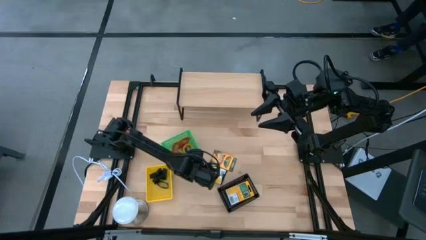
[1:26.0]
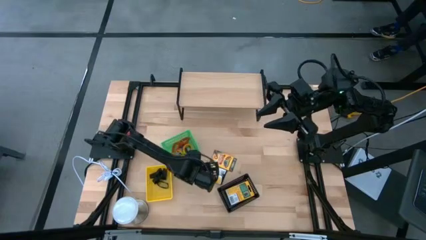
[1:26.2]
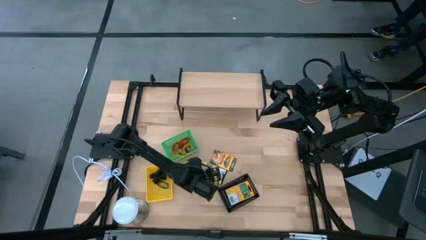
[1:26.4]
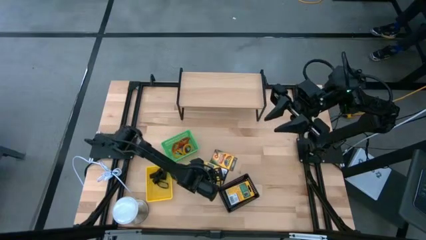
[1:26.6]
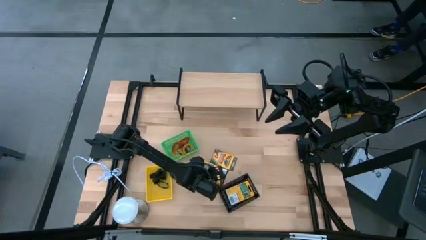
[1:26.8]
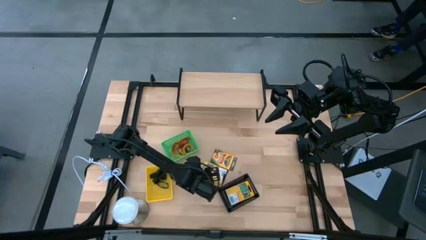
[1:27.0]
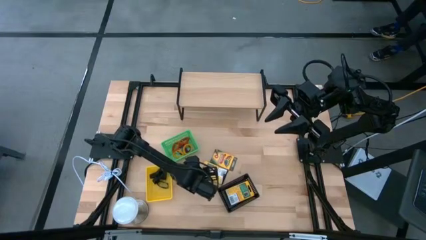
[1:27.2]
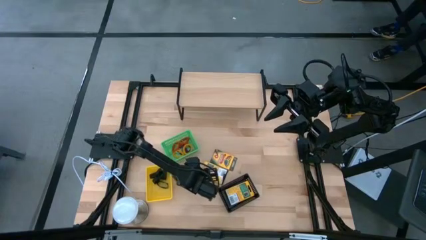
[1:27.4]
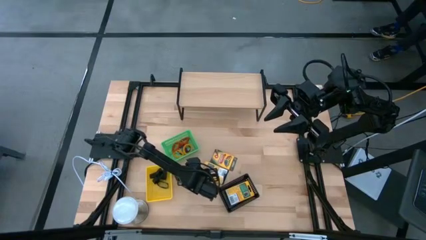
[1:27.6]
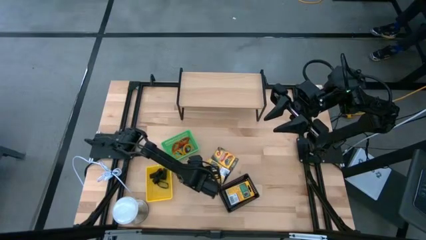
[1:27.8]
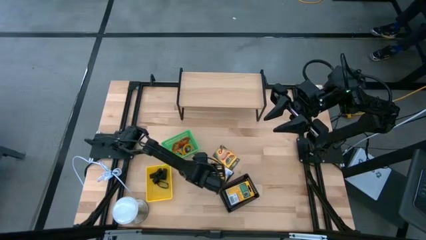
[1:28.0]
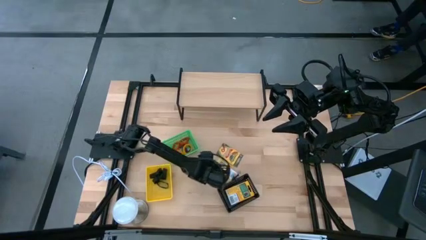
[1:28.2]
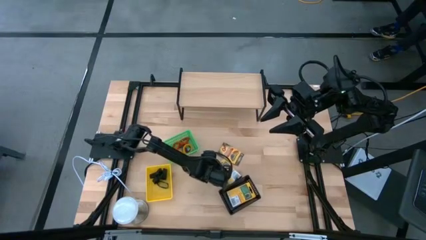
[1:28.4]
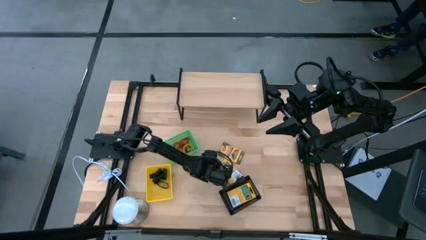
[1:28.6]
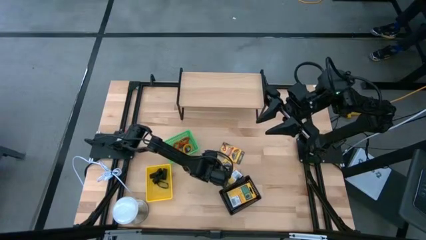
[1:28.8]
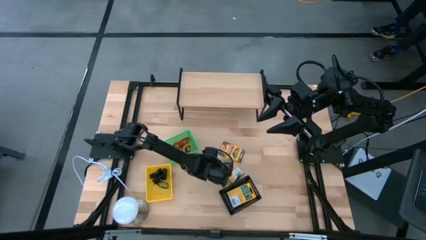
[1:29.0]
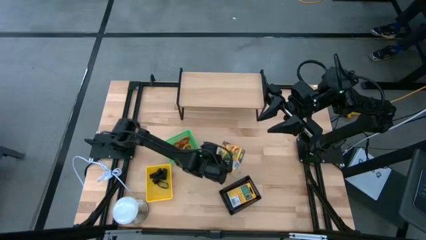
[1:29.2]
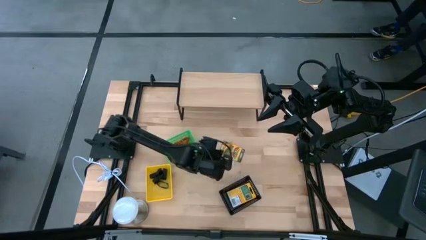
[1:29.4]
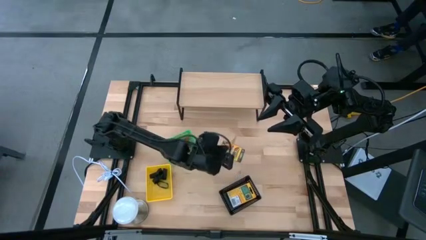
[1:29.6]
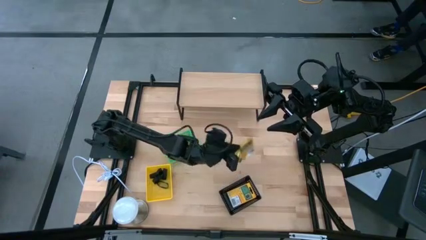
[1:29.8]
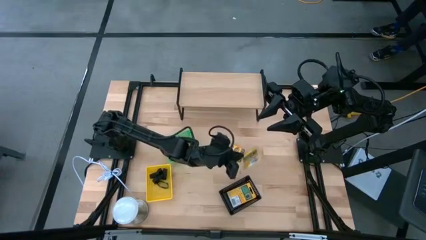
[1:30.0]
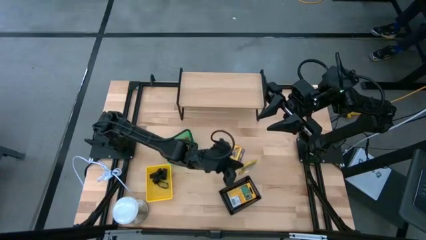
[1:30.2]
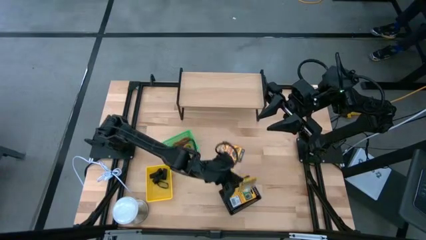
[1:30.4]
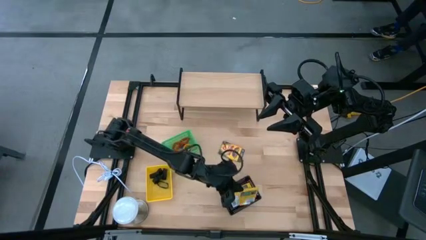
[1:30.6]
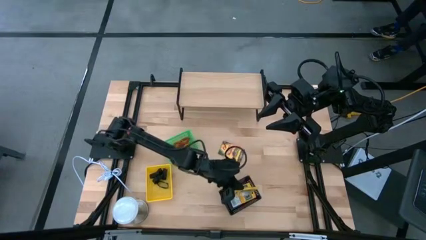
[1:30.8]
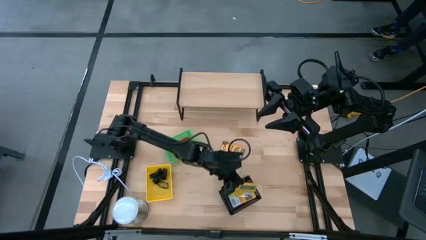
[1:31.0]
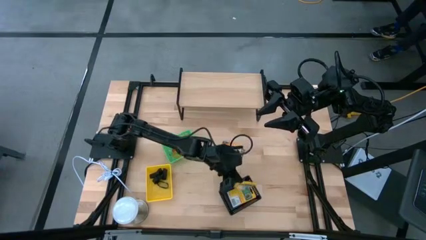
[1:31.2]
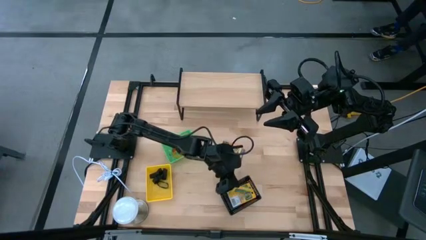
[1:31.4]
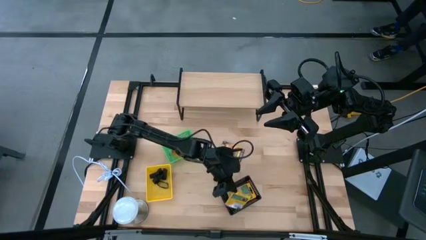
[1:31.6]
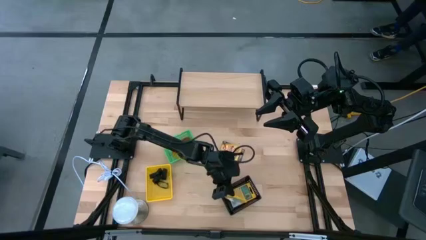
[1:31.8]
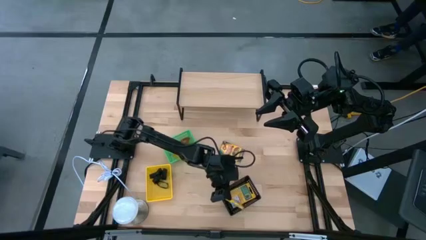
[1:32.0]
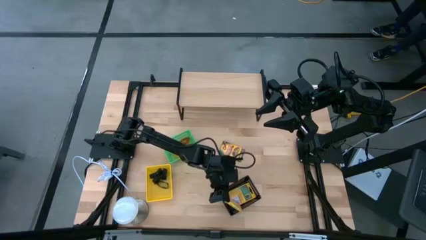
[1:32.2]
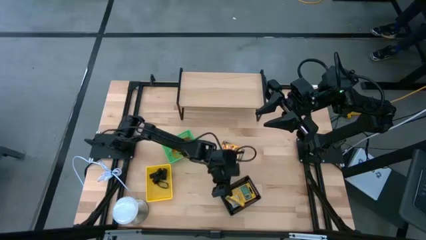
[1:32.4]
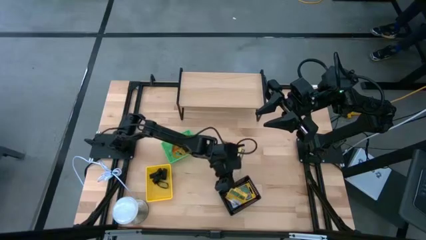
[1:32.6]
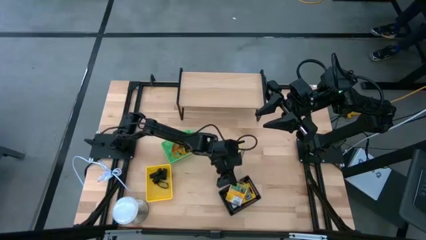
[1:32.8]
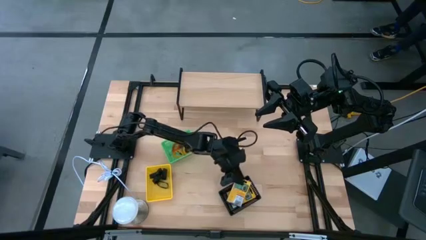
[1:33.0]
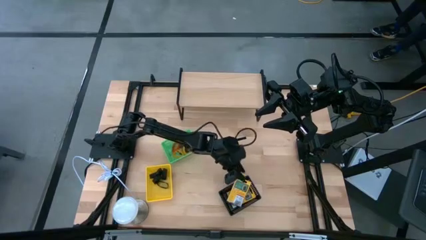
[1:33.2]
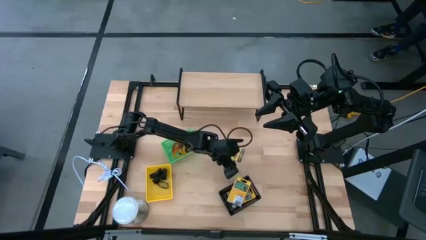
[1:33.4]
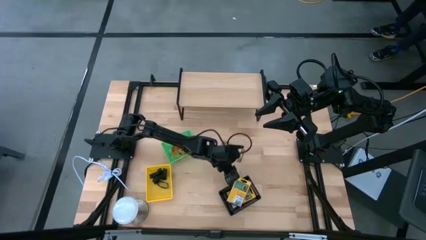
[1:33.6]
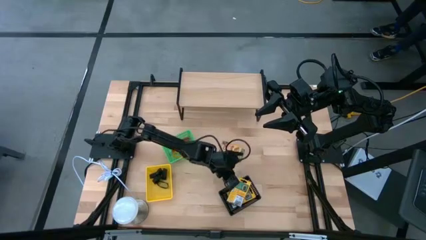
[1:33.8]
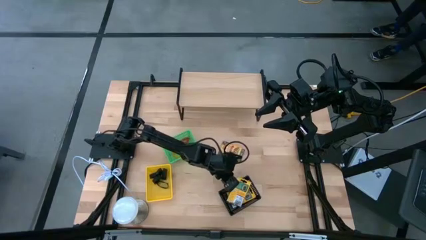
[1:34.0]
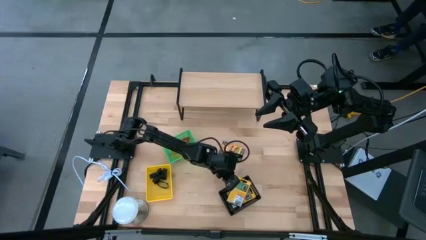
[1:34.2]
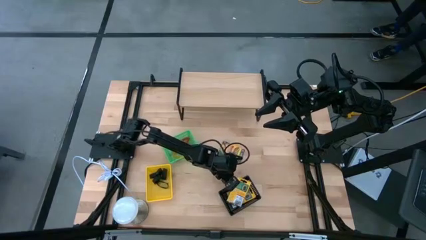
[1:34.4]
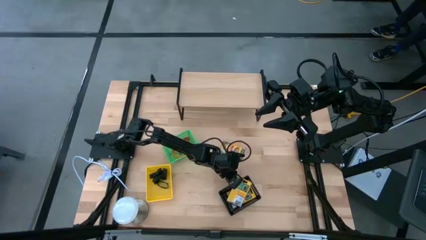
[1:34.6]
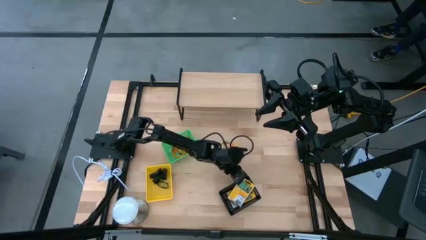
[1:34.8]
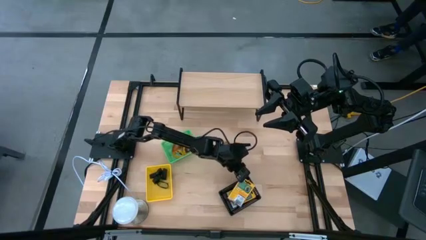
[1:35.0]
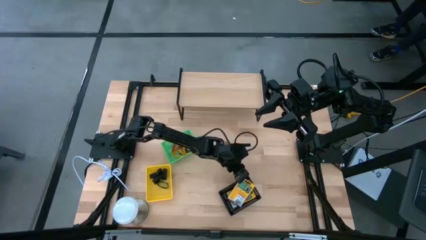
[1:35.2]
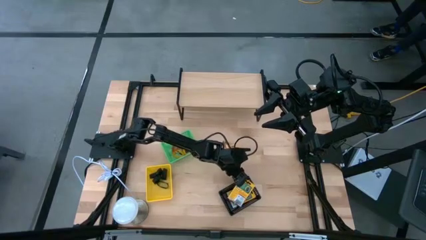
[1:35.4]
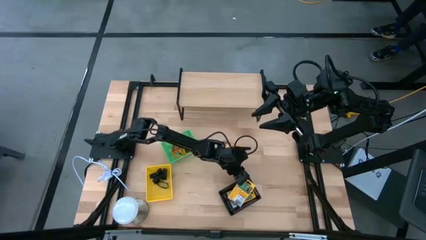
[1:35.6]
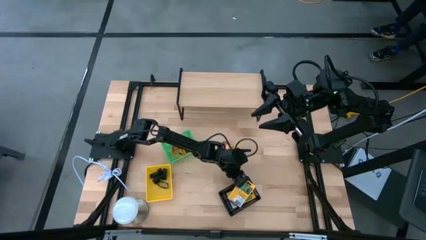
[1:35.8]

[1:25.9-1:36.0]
Task: Pick & Place Office Desk Supplies
Put the crayon box into the black basket

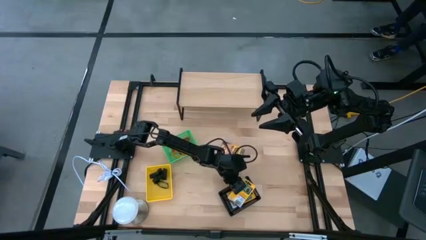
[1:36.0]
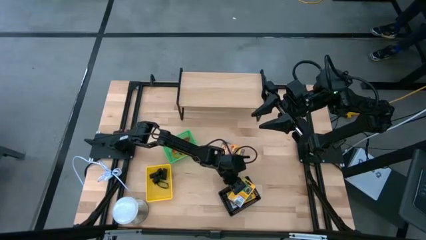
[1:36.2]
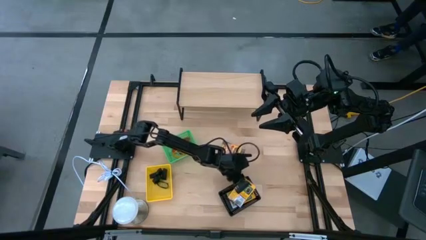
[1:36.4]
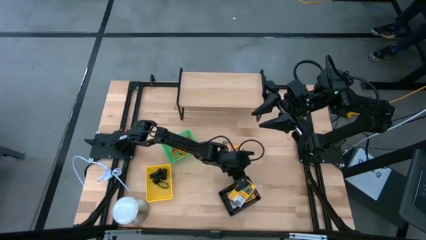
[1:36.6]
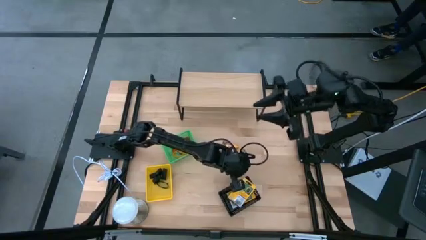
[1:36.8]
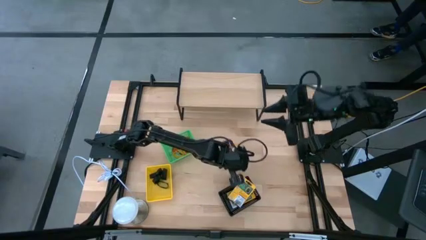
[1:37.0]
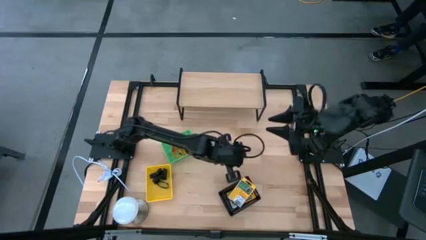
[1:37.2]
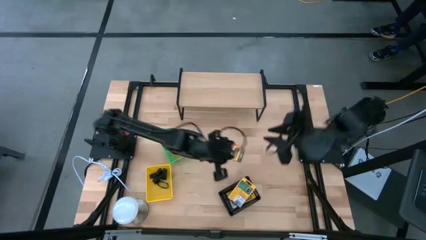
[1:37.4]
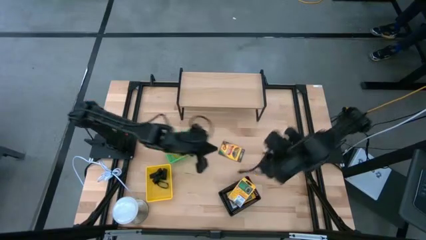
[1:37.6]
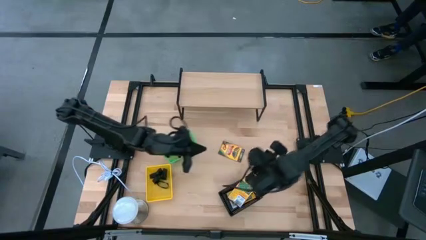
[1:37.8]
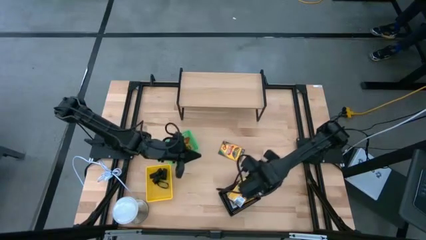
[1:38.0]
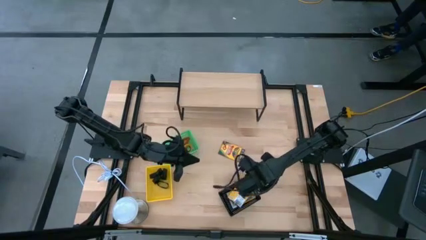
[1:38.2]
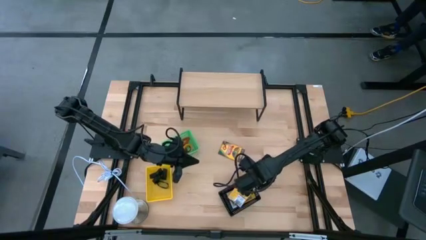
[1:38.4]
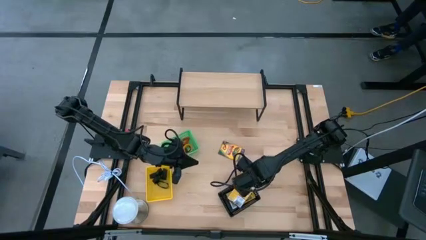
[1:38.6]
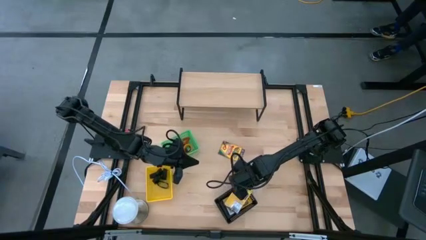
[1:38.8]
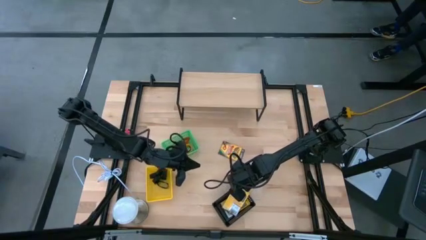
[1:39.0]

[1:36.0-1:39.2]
Adjust the black basket

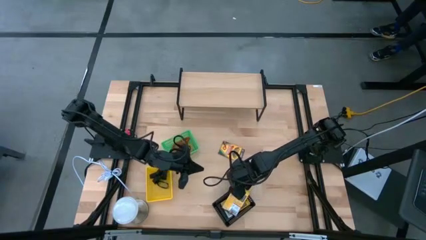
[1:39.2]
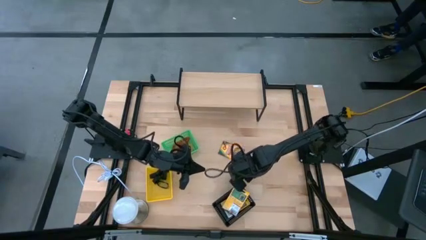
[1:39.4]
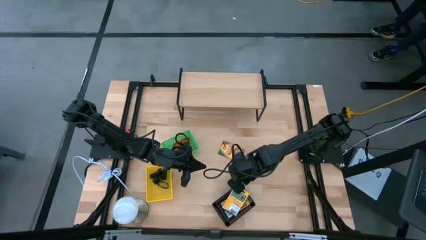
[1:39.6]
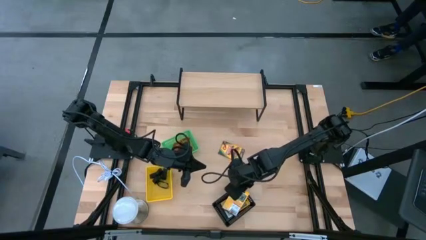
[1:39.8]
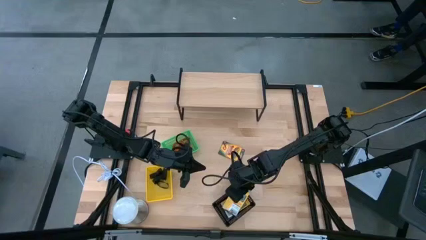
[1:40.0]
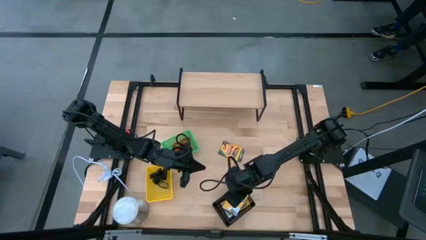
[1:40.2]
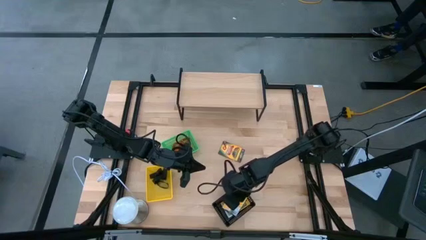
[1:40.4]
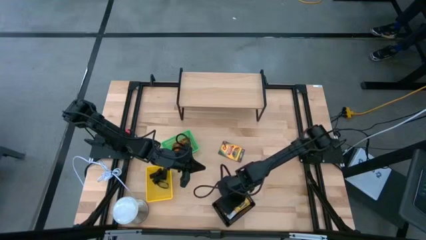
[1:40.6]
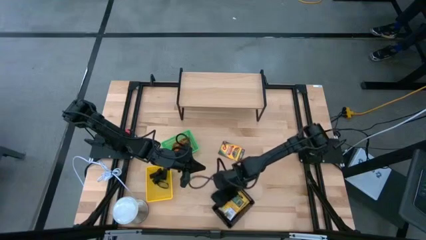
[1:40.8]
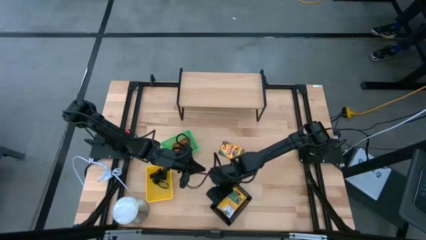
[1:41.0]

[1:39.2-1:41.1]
Adjust the crayon box in the black basket

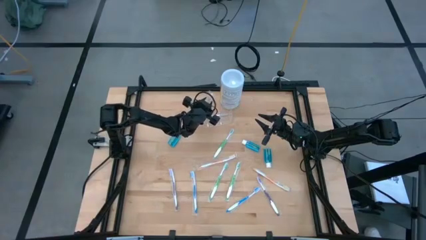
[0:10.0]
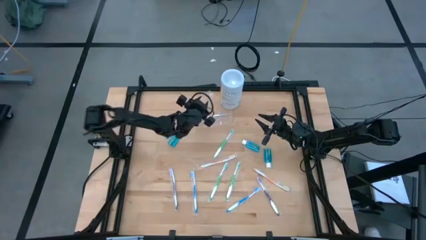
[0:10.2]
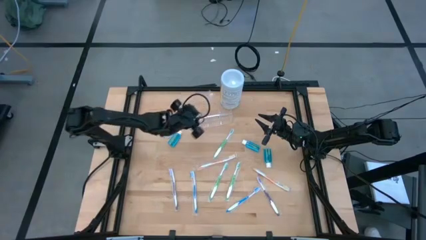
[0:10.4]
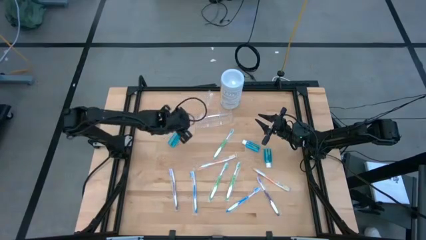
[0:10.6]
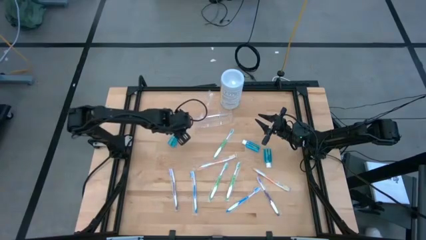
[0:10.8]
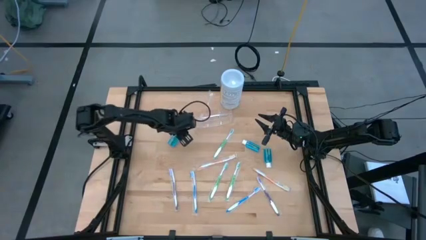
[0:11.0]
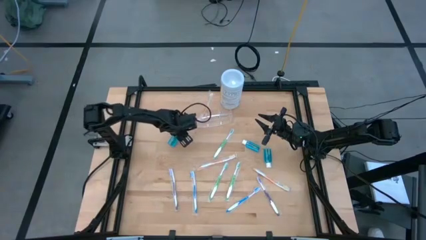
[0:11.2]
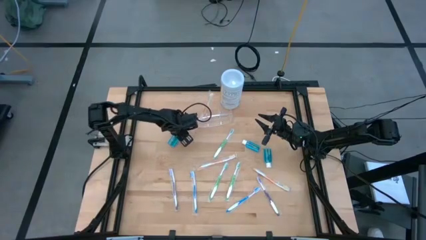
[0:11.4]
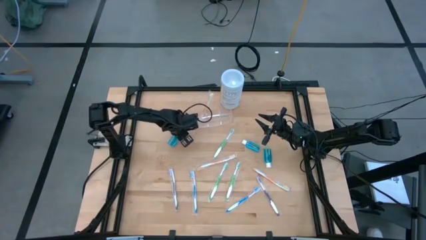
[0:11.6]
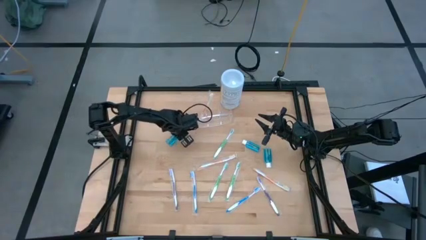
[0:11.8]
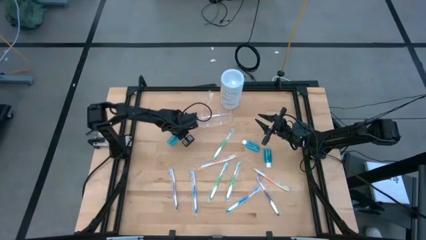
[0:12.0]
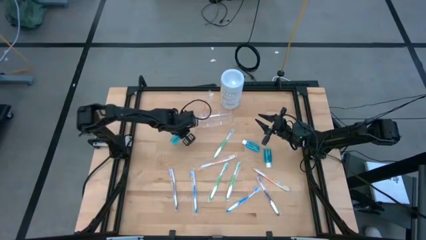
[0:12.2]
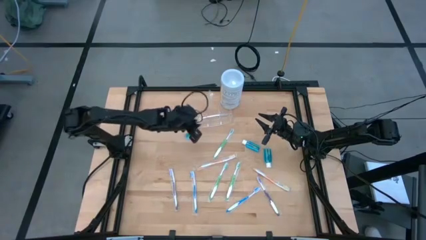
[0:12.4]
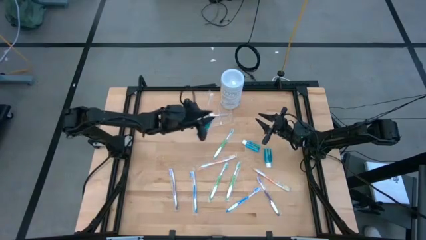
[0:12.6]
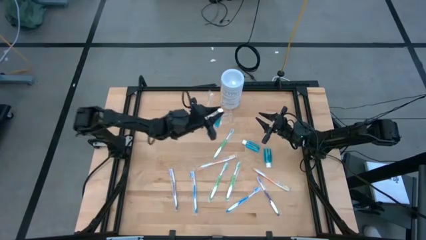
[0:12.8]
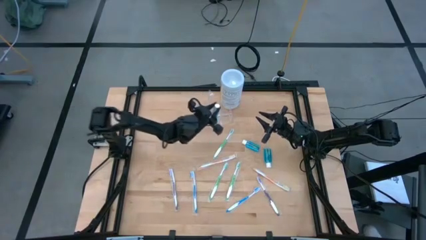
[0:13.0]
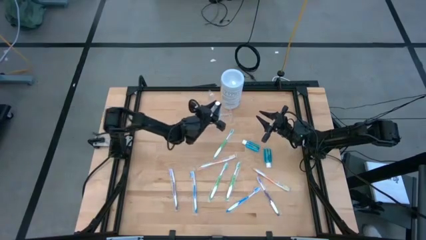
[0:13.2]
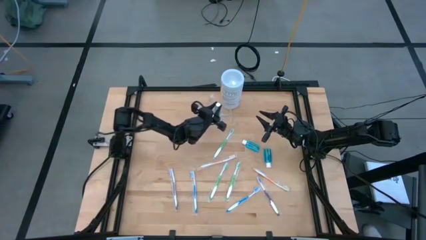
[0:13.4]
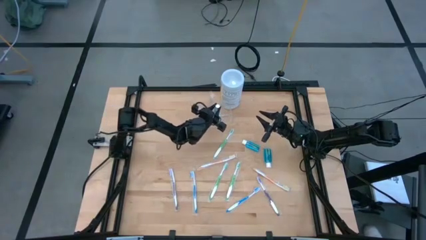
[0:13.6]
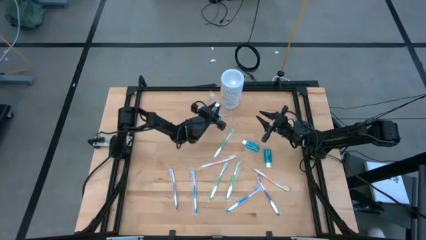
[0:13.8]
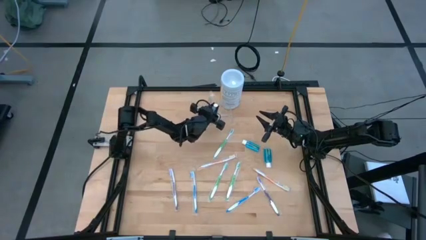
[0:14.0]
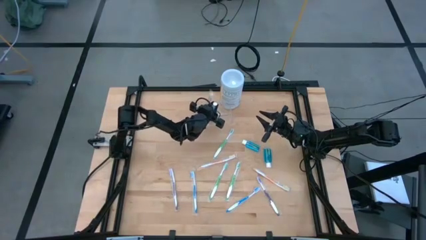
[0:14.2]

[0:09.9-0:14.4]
Task: Pick & Place toothbrushing station
Put the top left blue mouthwash into the transparent organizer
